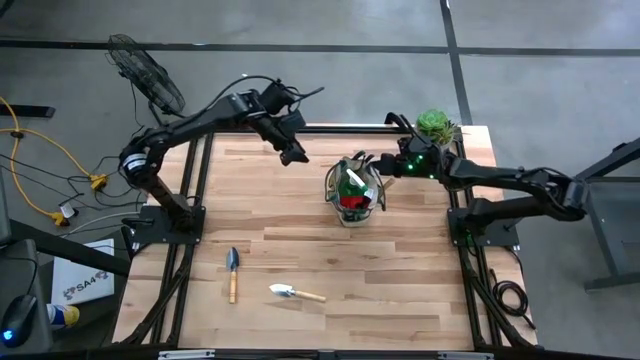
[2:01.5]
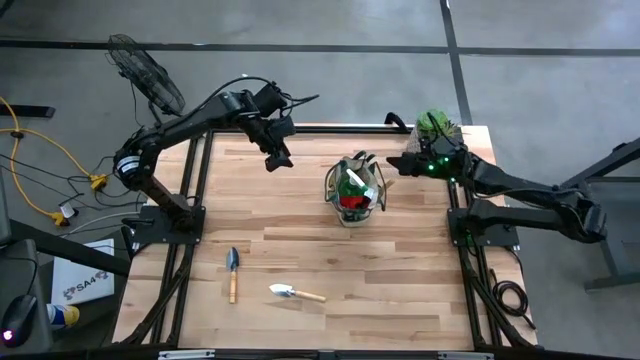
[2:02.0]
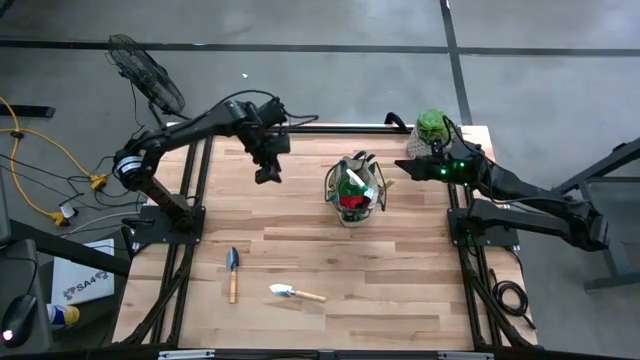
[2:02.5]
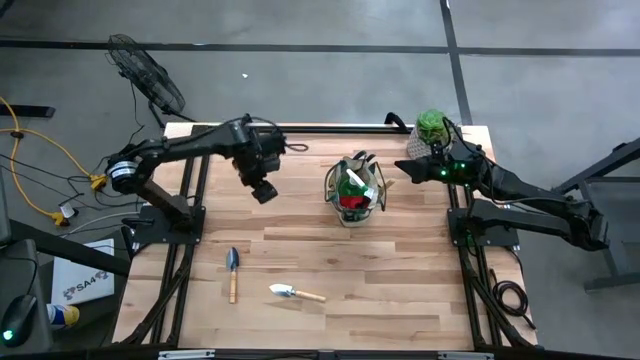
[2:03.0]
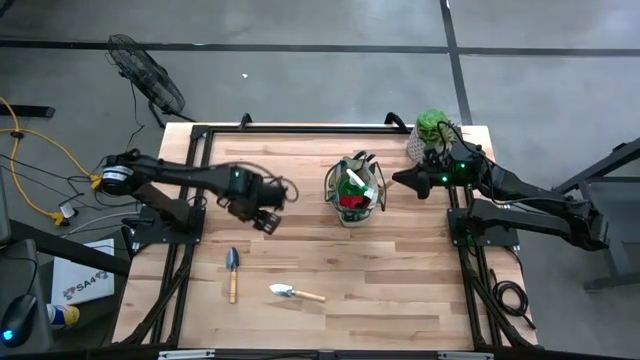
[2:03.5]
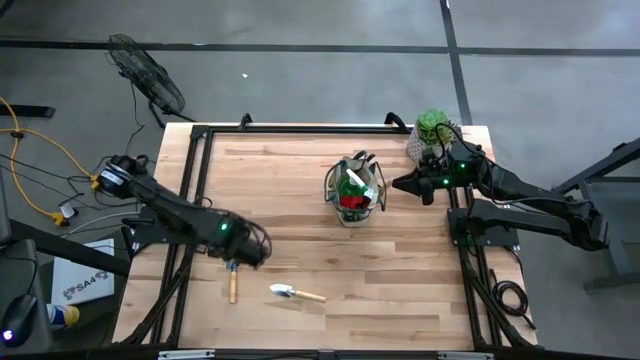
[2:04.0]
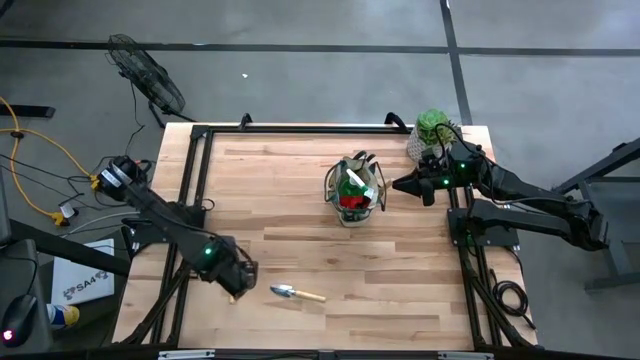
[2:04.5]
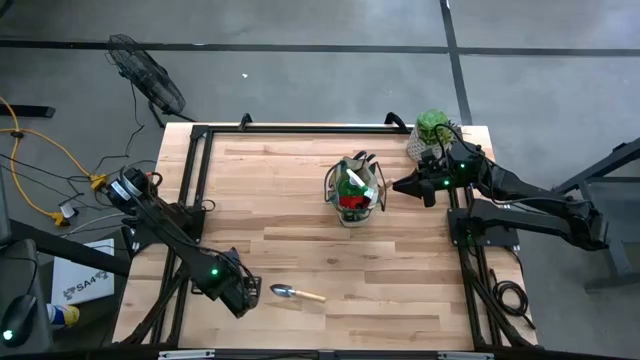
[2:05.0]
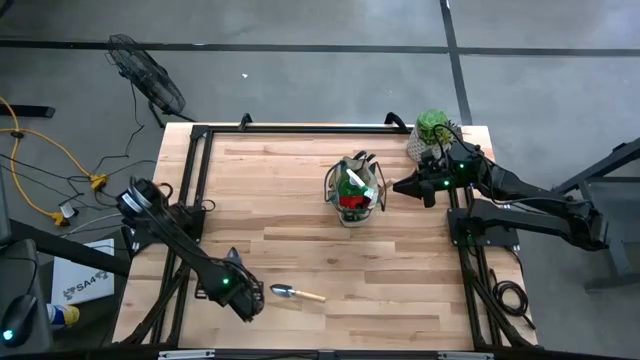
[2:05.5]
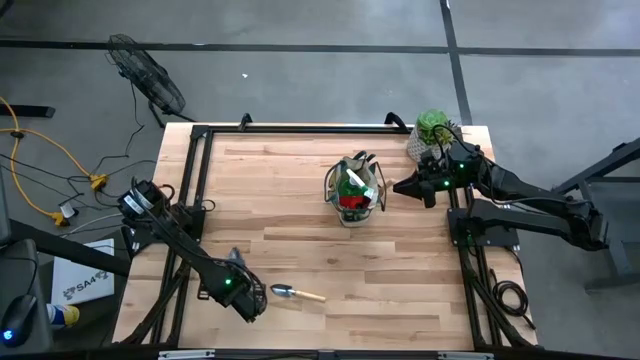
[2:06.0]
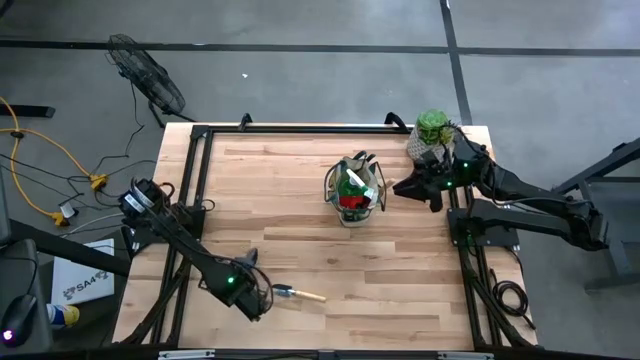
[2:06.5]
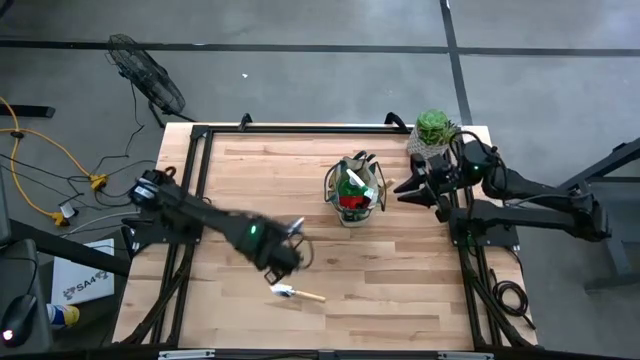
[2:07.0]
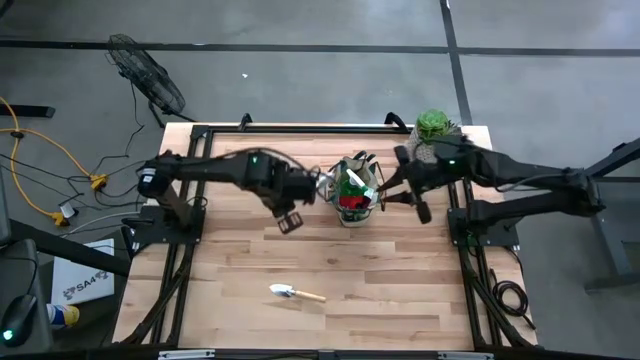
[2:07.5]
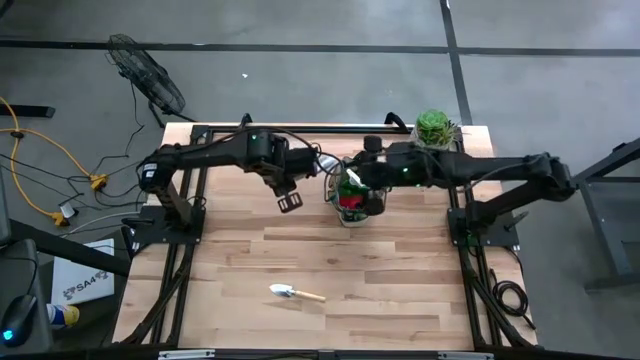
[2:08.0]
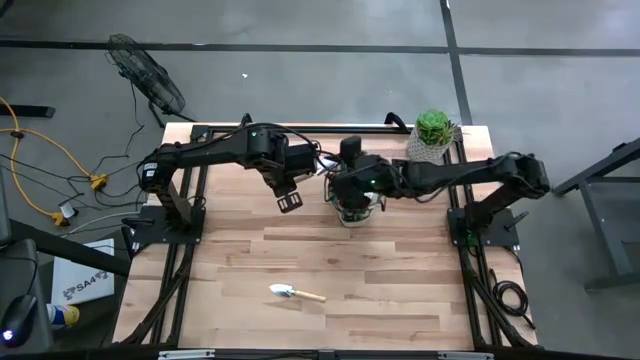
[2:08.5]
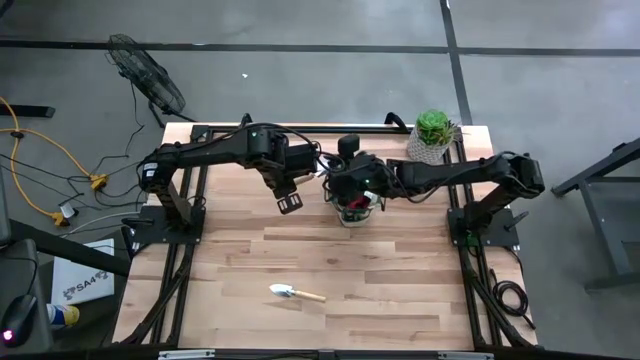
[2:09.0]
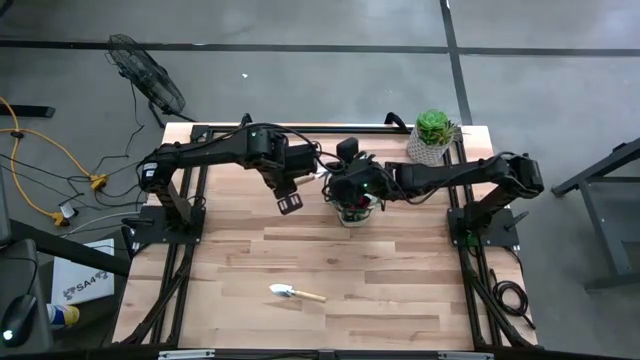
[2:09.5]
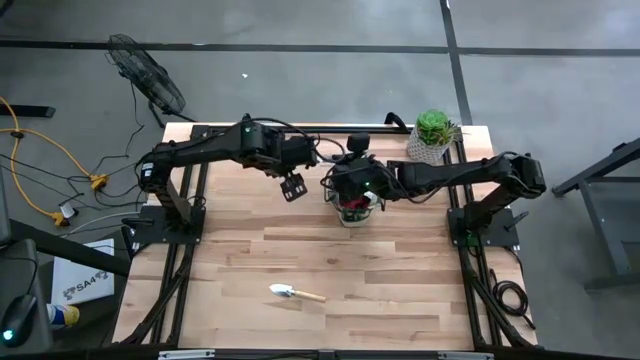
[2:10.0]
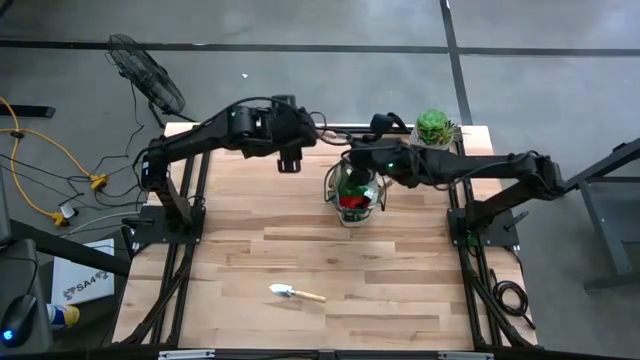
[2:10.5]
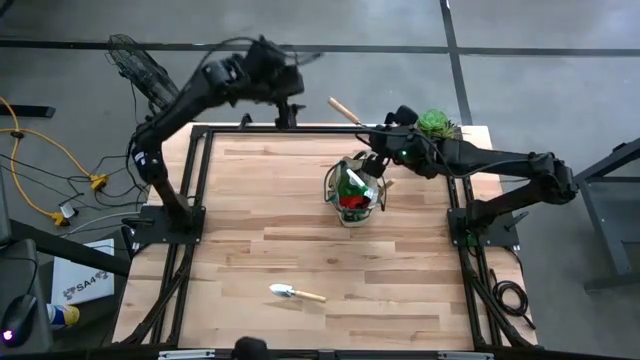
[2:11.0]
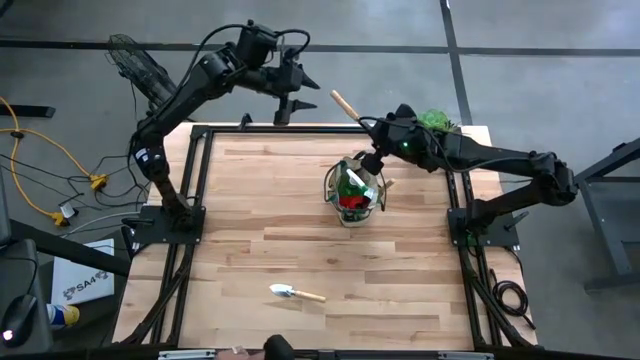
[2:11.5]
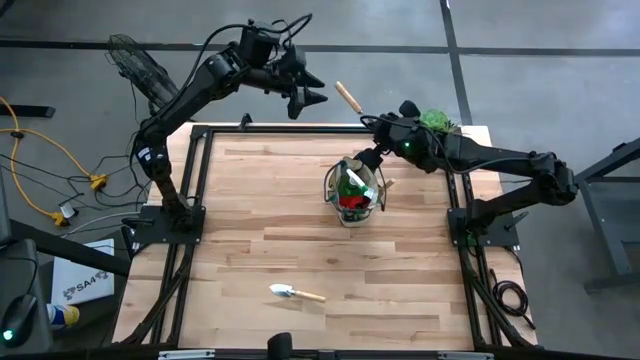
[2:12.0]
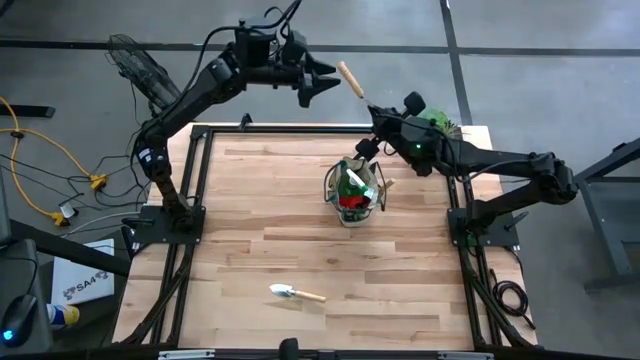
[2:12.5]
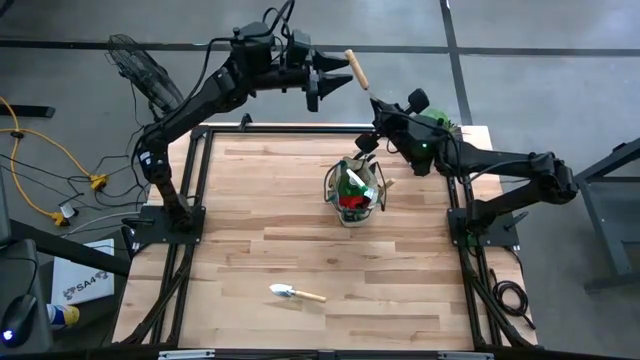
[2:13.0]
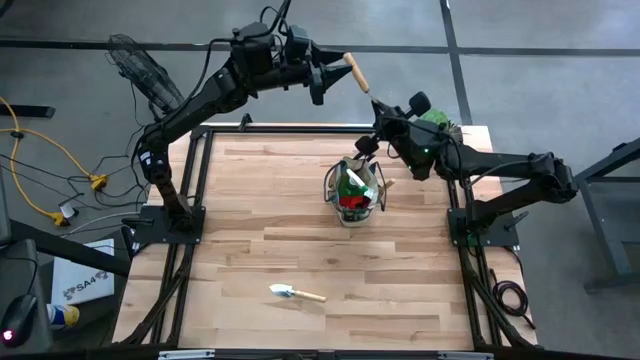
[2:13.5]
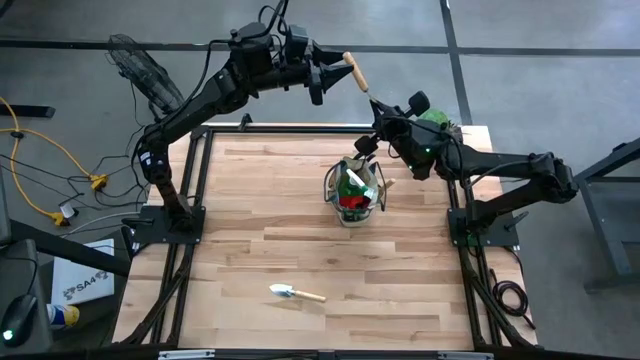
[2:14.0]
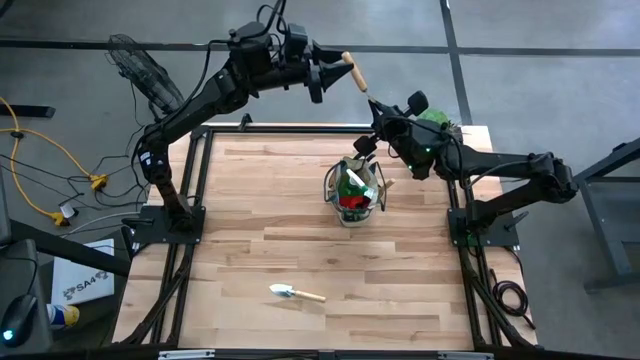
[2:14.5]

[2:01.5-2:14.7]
Task: Pick & Place Garden tools in Gardening bag
Put the left brown trowel into the gardening bag

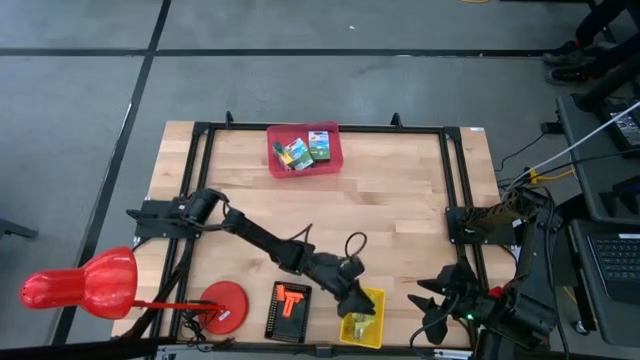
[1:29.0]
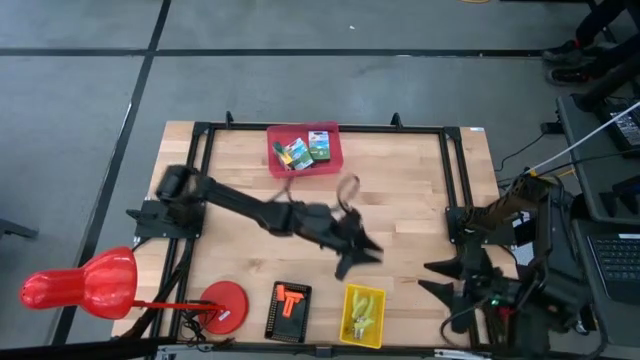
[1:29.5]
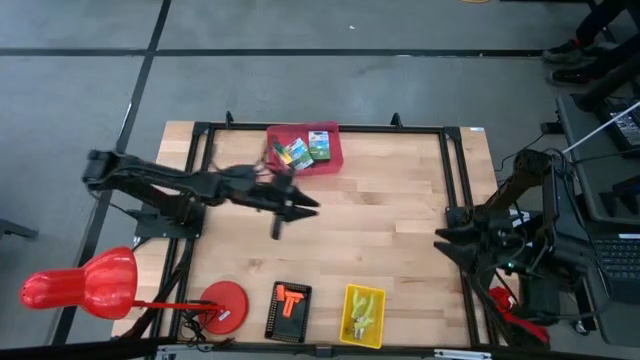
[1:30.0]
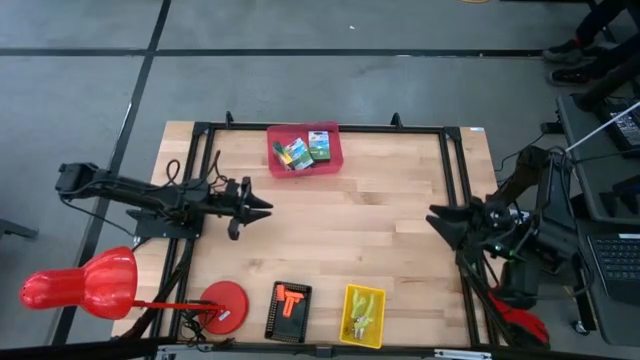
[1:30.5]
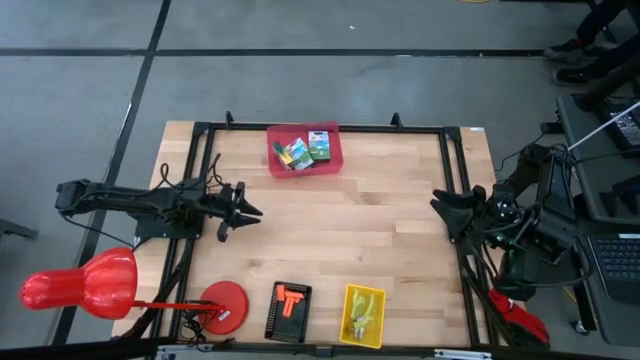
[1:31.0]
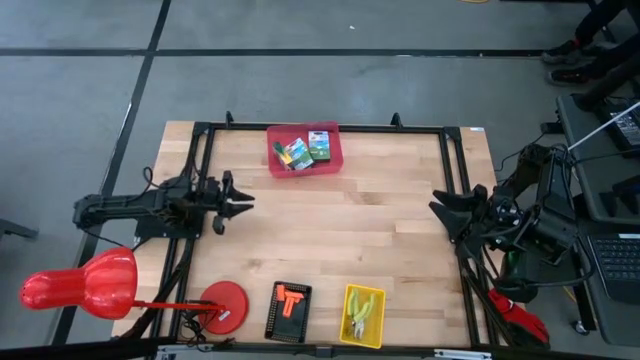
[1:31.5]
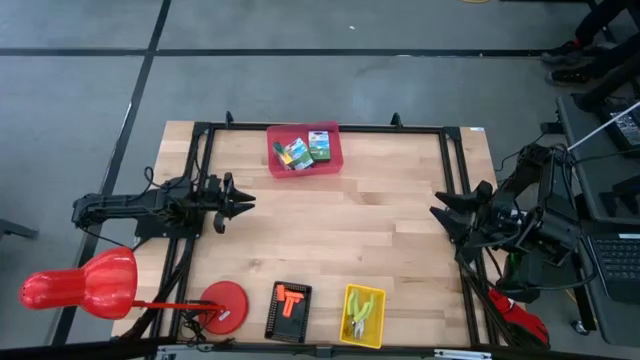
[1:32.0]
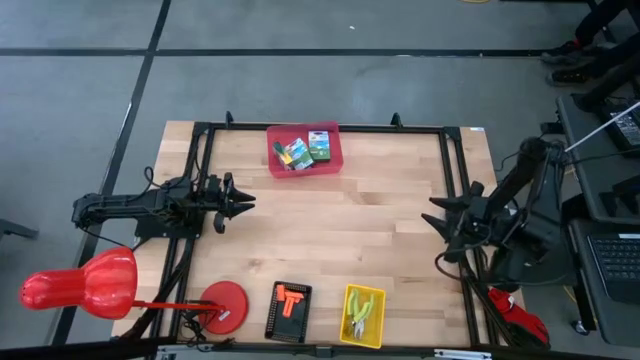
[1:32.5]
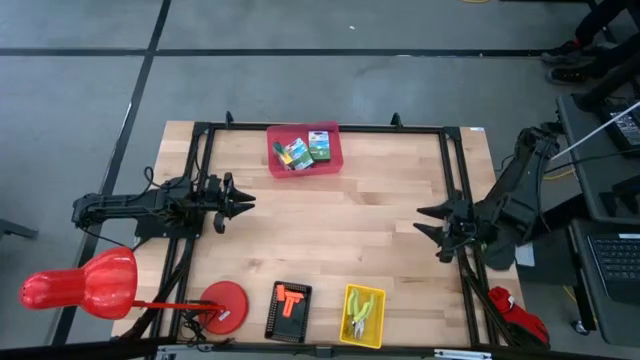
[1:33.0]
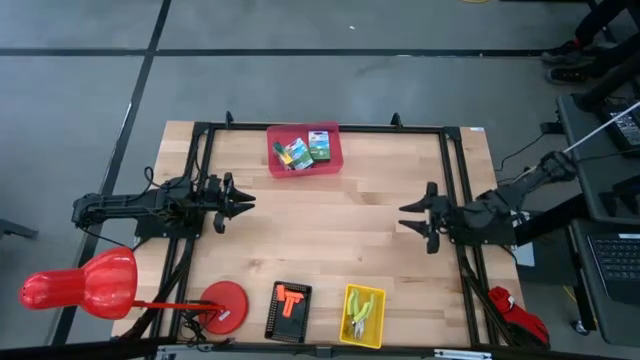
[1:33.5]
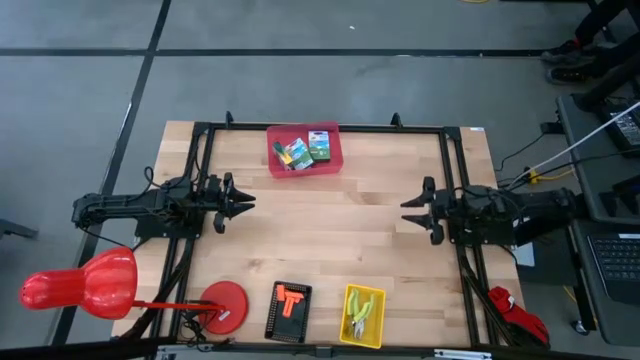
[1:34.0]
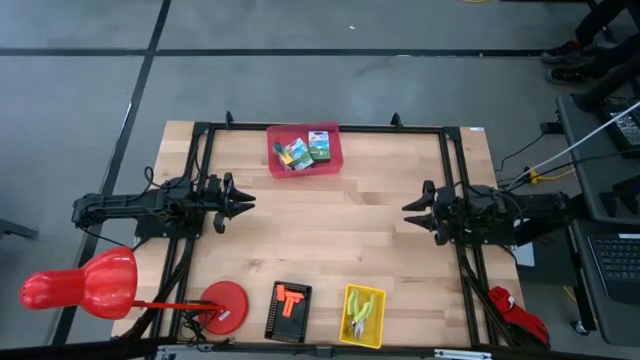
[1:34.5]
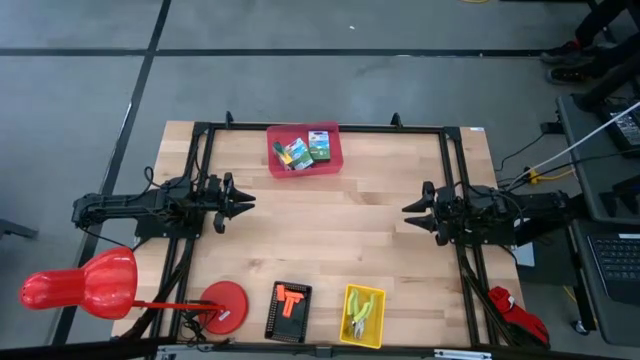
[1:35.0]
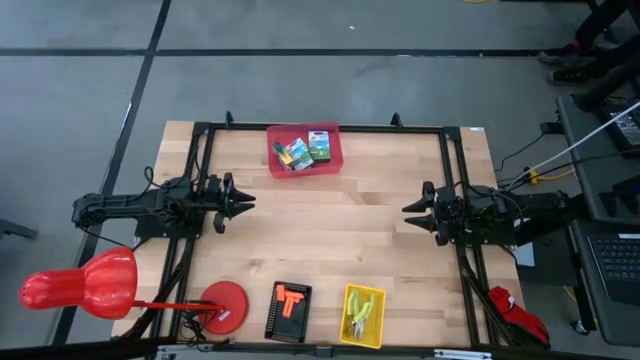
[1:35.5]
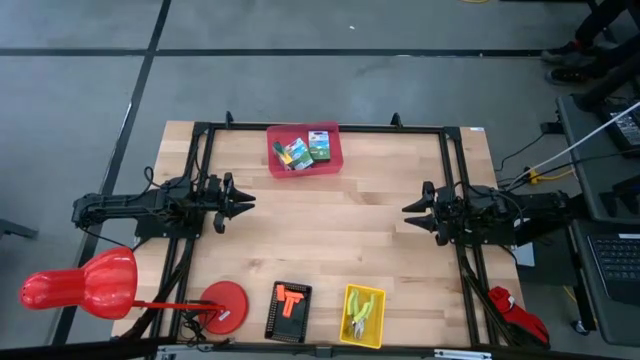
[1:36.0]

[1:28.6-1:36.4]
Task: Pick & Place School Supplies
Return to Home Position
